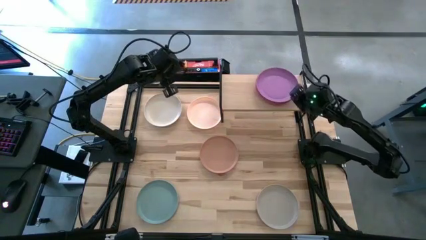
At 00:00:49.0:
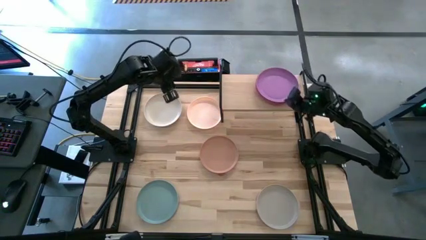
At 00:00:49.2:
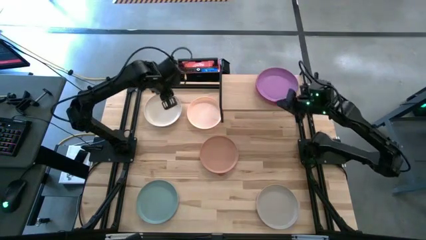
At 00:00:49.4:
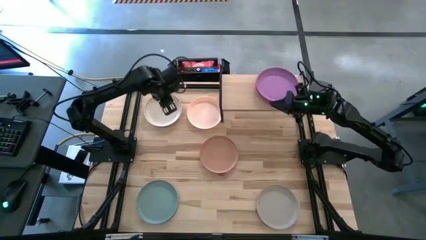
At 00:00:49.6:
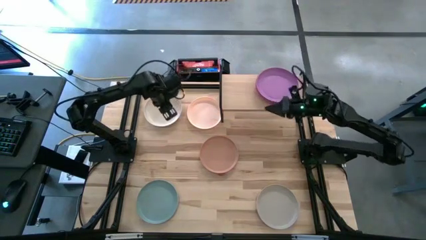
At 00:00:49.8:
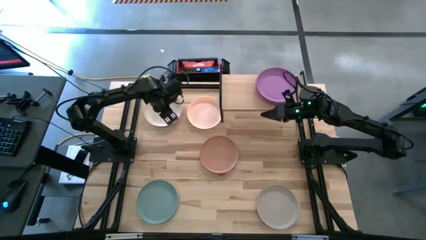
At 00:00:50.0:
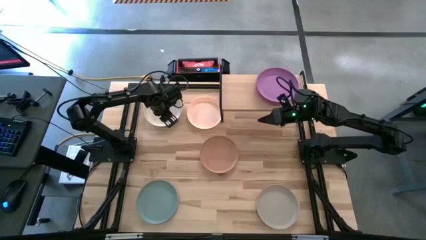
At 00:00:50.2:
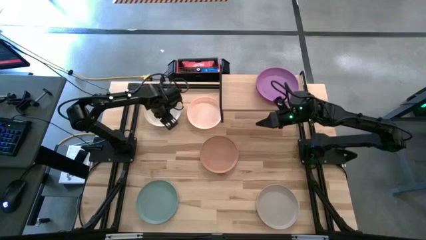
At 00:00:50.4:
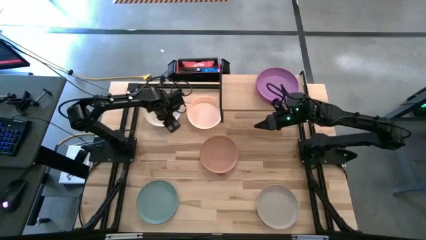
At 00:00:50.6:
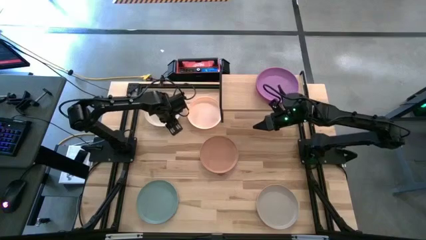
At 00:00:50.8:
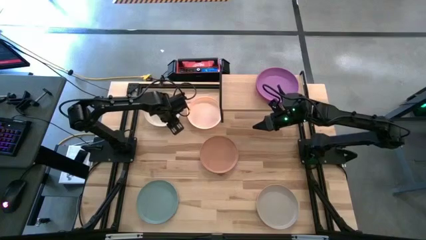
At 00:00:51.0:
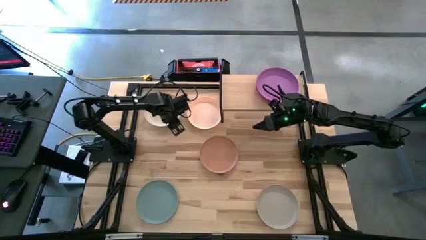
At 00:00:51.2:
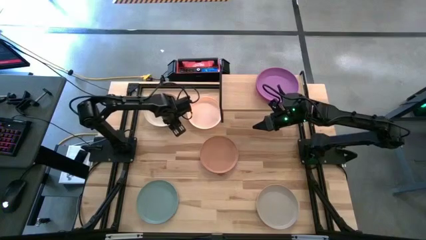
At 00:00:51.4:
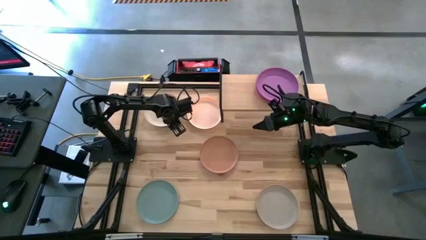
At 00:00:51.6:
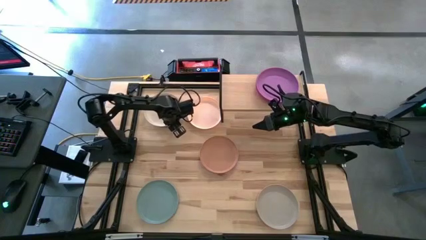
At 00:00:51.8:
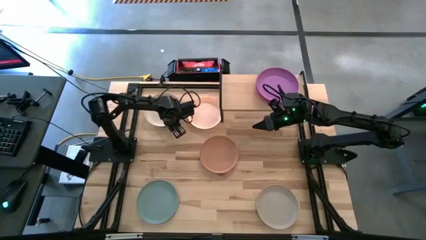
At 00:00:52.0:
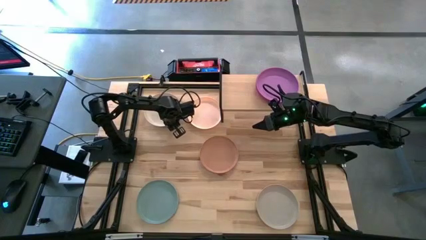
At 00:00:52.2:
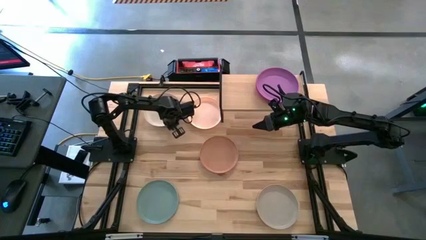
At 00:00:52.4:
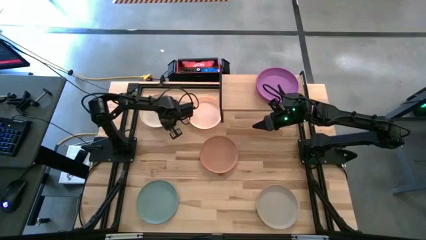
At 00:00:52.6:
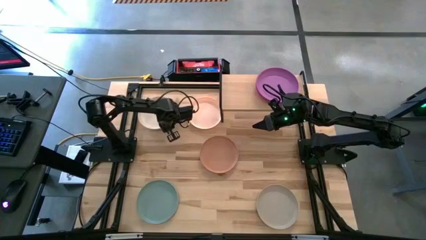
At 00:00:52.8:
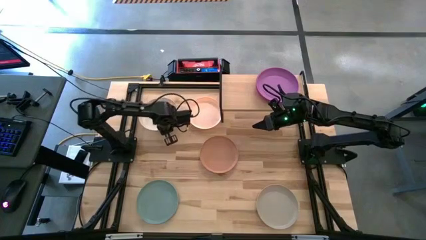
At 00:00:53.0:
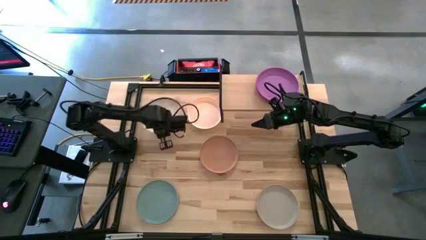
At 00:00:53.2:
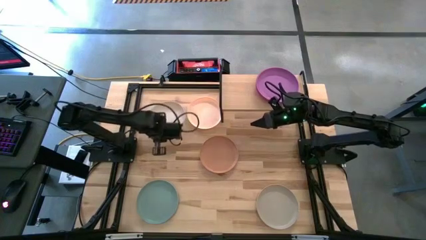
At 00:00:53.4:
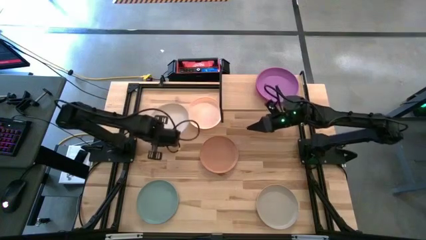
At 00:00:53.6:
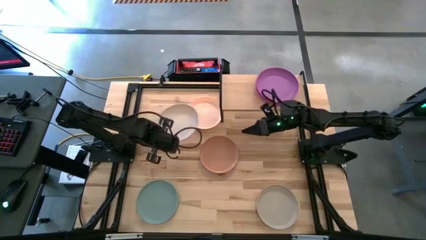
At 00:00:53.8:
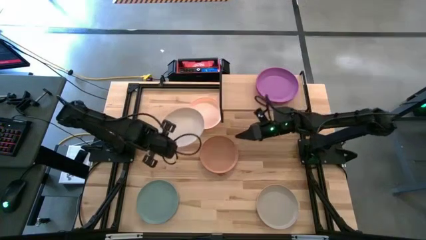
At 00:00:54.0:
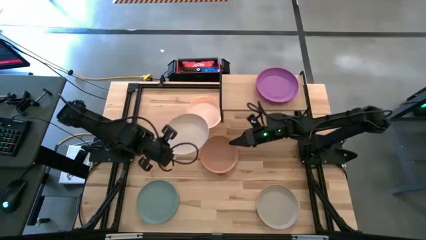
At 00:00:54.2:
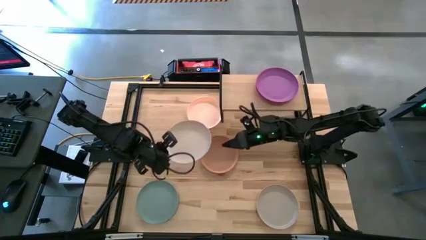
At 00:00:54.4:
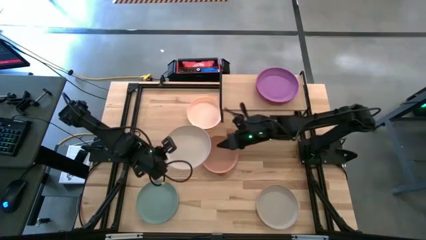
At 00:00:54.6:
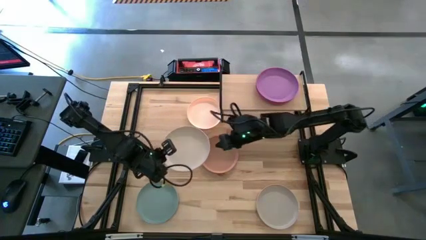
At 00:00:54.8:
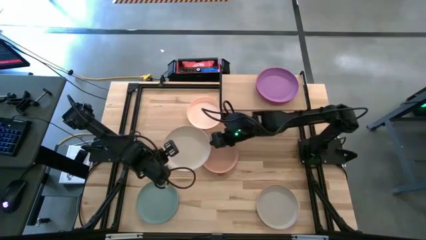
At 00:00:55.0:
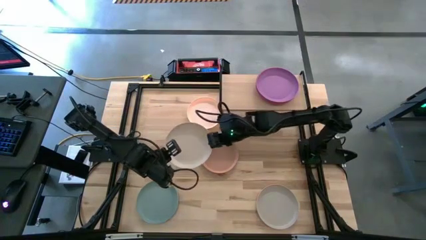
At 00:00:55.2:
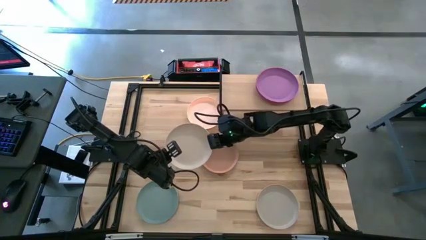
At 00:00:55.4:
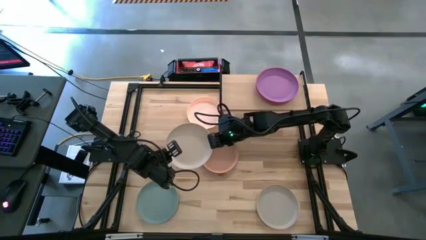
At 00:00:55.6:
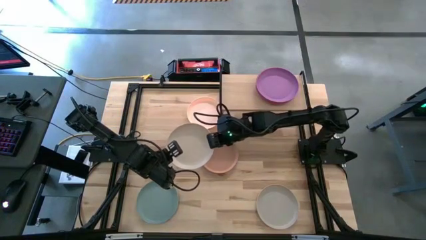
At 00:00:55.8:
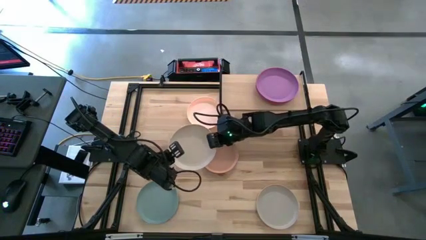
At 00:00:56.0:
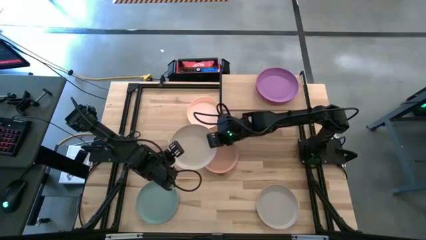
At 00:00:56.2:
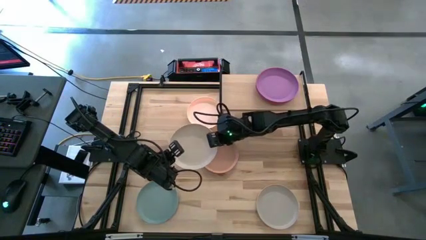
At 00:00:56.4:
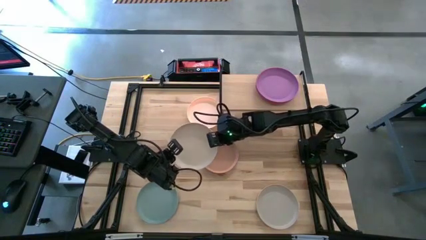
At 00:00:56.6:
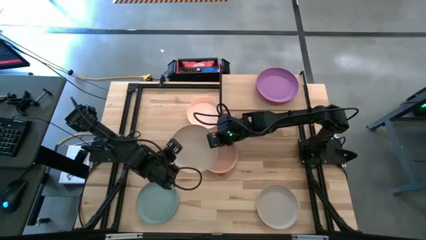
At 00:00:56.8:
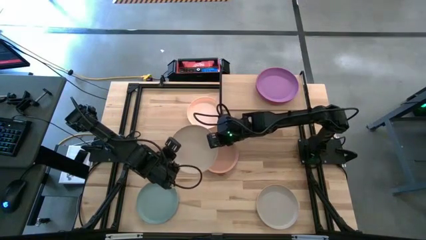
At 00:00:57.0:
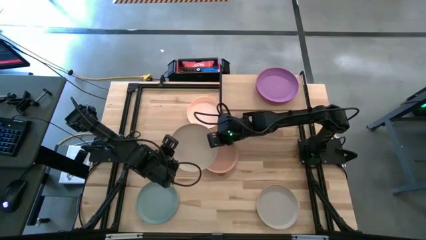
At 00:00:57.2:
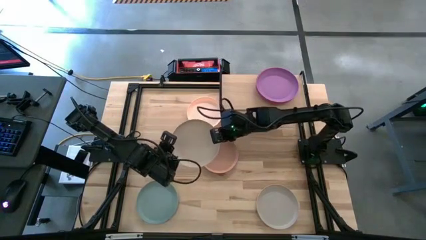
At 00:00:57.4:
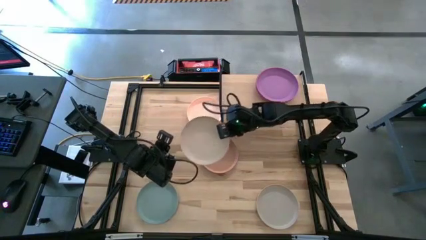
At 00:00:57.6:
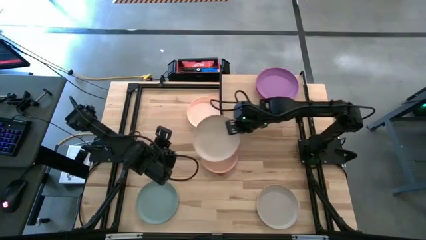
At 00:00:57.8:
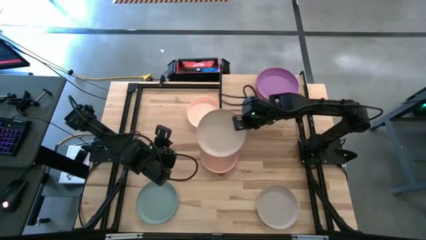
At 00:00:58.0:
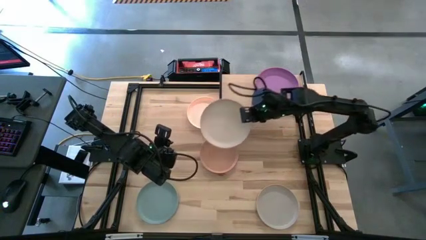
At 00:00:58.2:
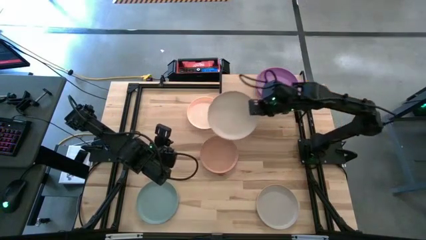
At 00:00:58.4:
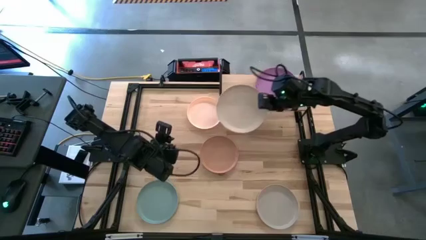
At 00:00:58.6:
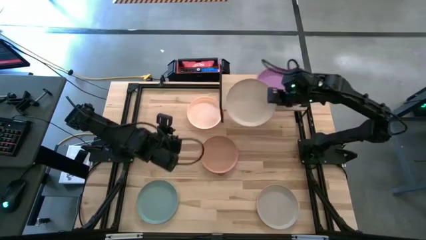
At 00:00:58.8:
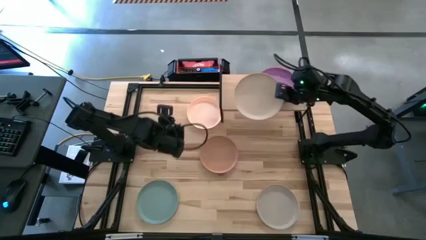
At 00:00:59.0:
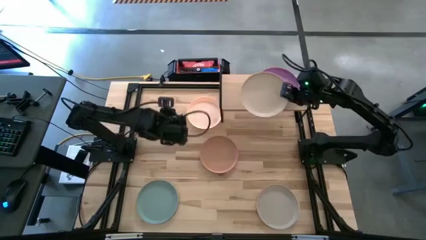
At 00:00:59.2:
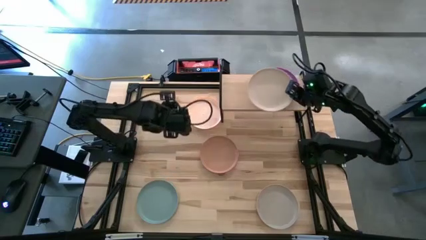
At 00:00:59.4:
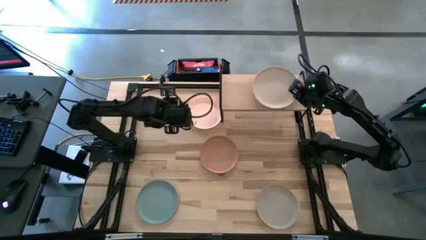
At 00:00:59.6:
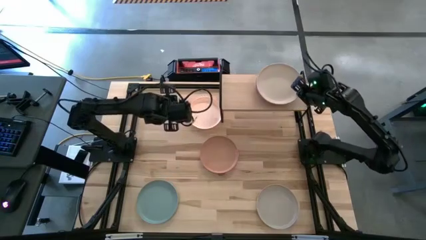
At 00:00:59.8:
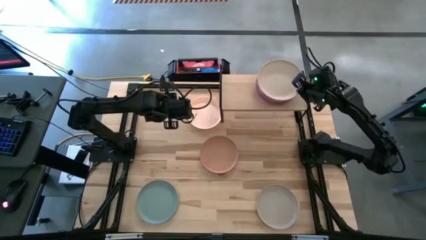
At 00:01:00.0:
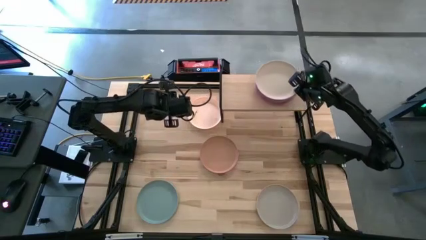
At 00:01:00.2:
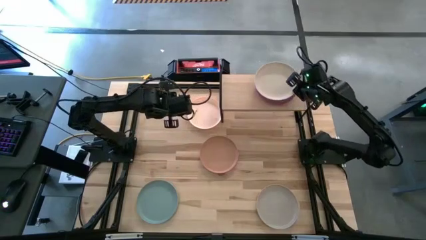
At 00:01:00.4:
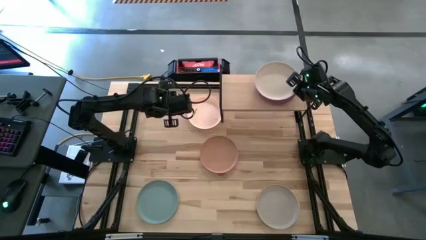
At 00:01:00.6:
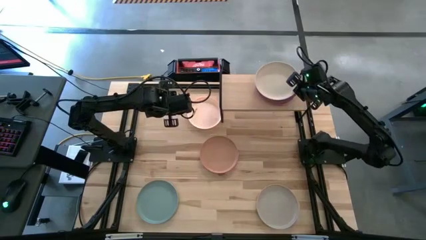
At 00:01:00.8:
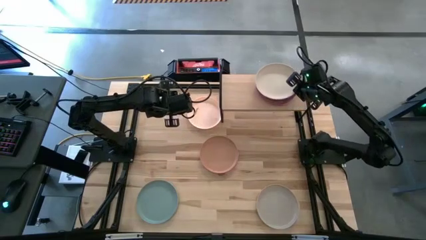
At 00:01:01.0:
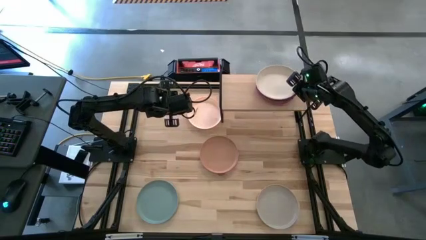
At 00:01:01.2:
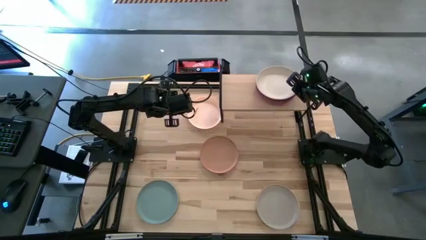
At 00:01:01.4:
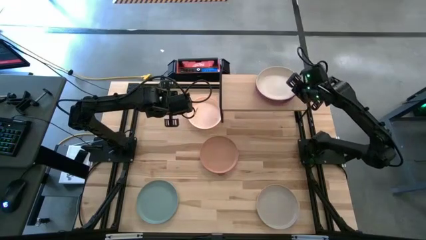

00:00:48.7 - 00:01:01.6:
Task: Place and stack plates onto a shelf
Stack the top white plate on top of the purple plate
